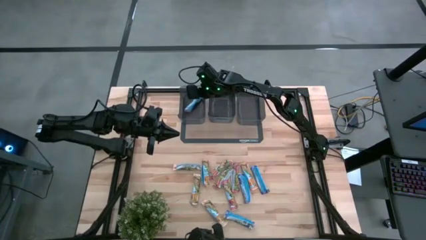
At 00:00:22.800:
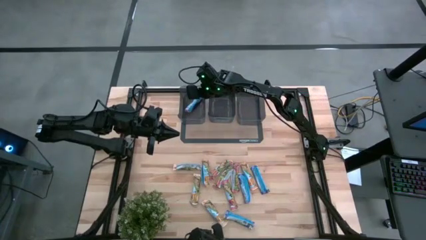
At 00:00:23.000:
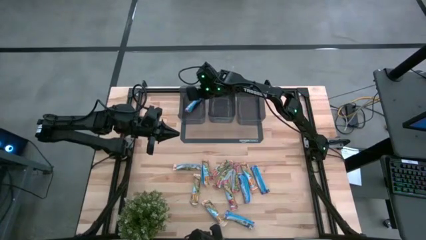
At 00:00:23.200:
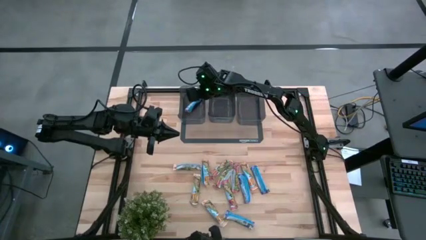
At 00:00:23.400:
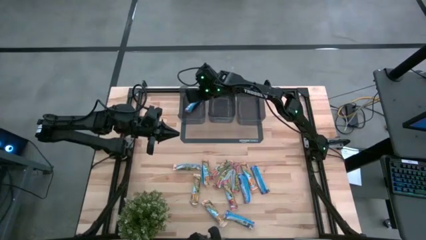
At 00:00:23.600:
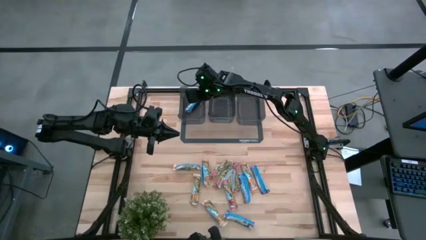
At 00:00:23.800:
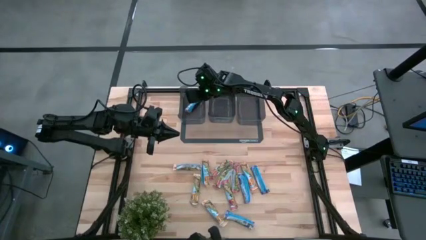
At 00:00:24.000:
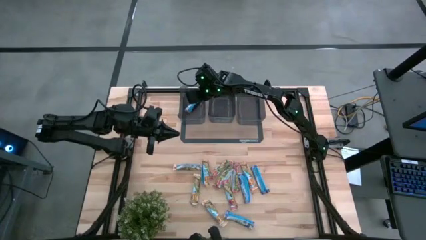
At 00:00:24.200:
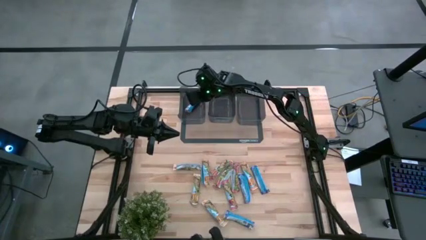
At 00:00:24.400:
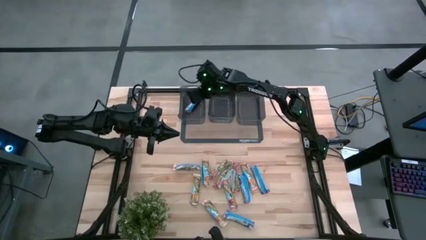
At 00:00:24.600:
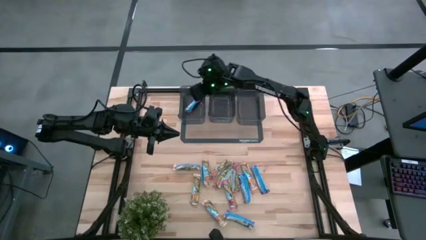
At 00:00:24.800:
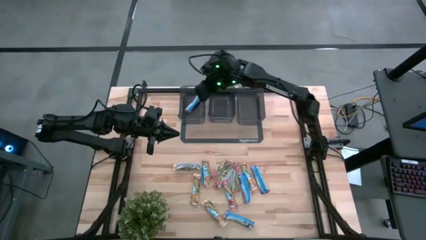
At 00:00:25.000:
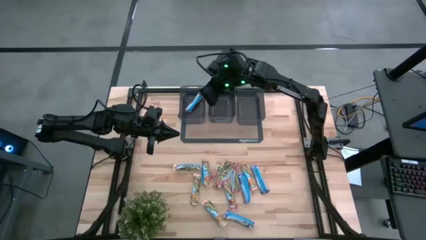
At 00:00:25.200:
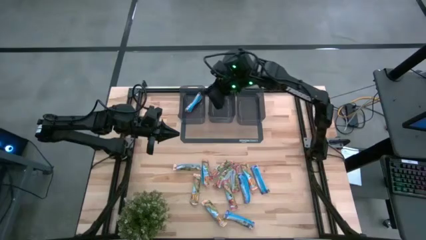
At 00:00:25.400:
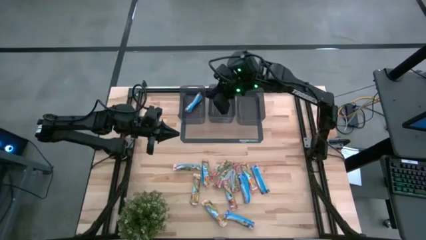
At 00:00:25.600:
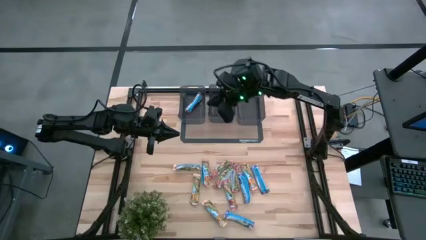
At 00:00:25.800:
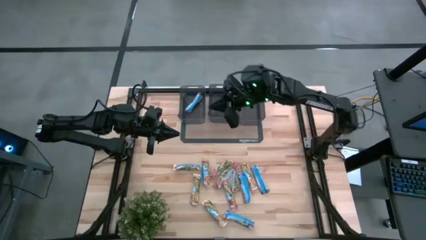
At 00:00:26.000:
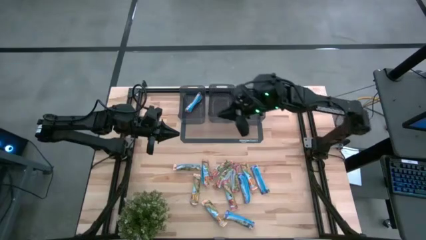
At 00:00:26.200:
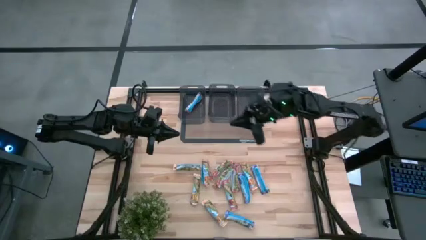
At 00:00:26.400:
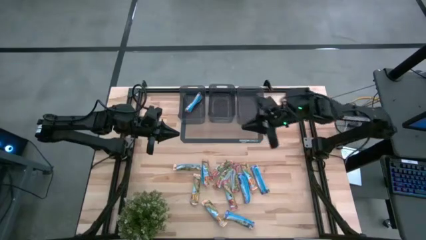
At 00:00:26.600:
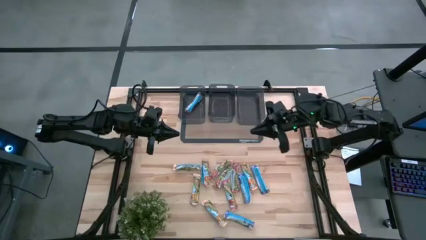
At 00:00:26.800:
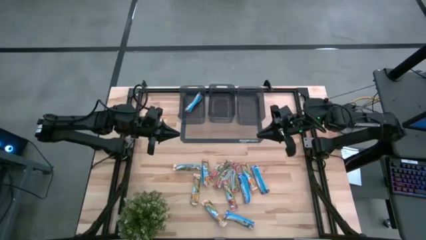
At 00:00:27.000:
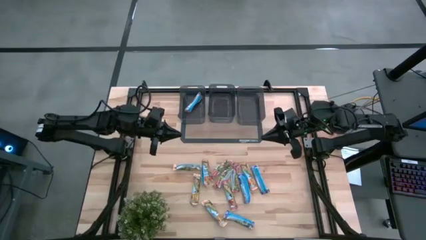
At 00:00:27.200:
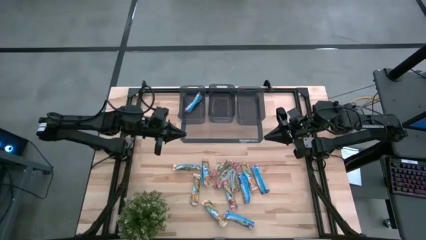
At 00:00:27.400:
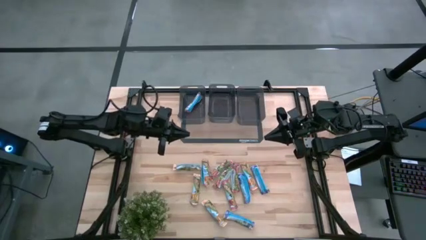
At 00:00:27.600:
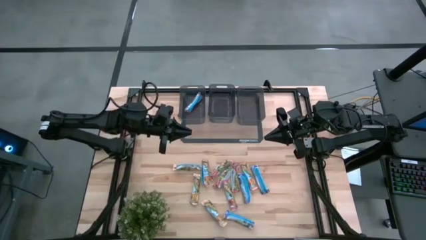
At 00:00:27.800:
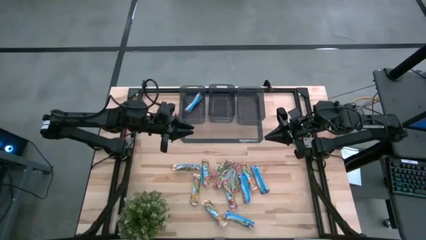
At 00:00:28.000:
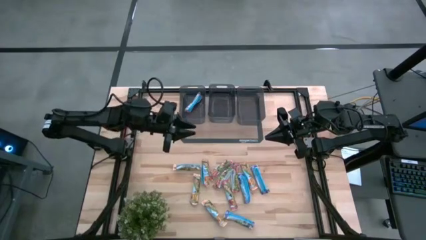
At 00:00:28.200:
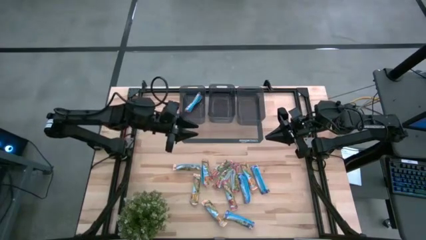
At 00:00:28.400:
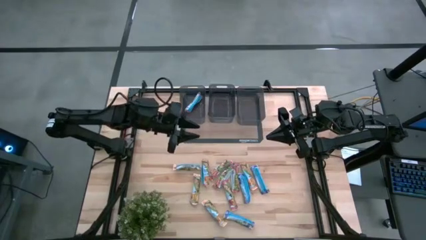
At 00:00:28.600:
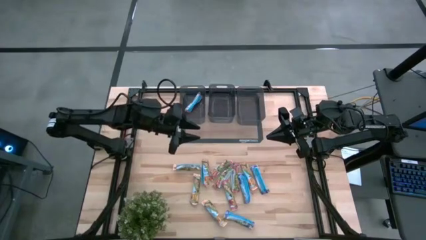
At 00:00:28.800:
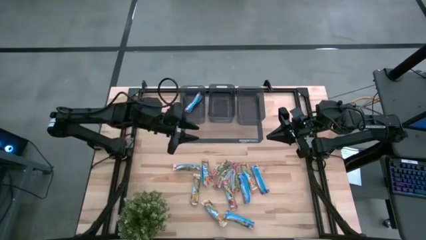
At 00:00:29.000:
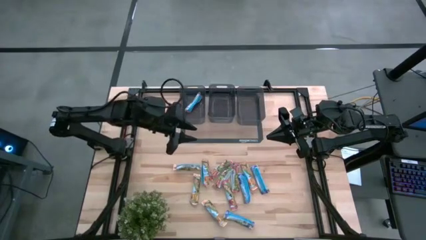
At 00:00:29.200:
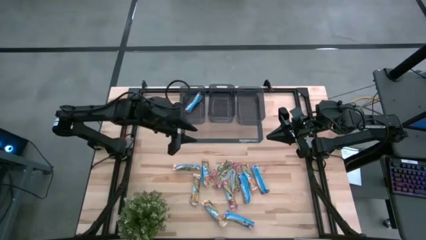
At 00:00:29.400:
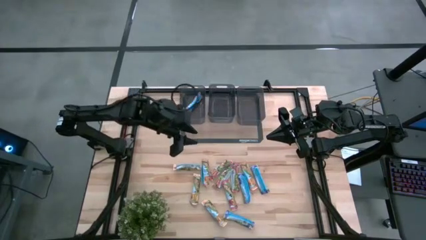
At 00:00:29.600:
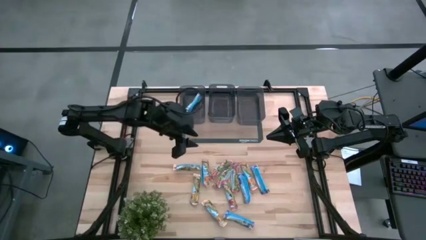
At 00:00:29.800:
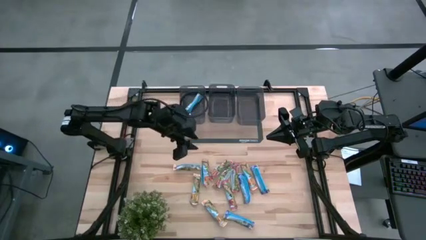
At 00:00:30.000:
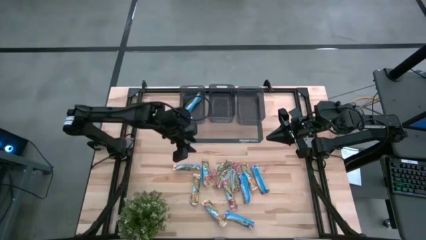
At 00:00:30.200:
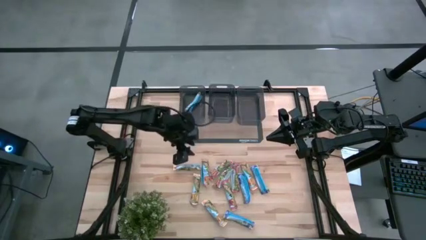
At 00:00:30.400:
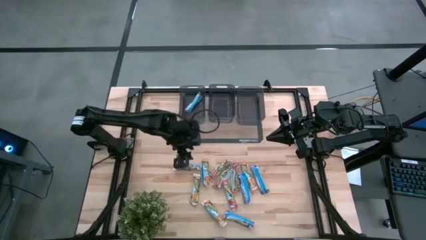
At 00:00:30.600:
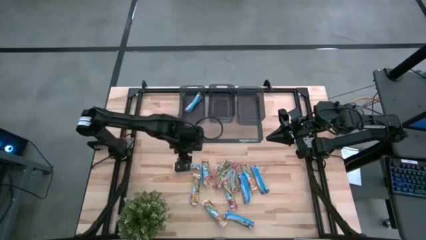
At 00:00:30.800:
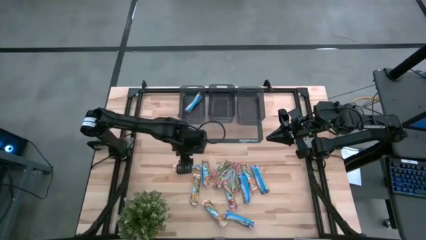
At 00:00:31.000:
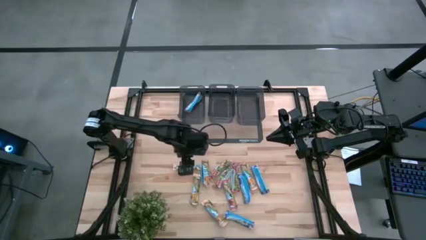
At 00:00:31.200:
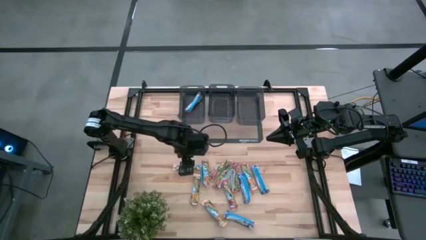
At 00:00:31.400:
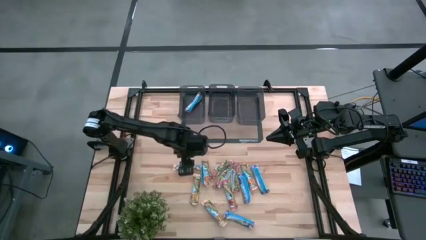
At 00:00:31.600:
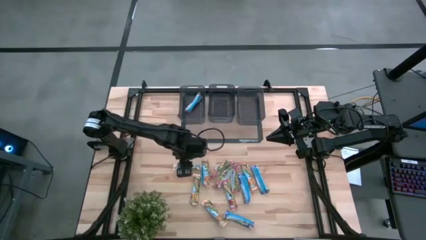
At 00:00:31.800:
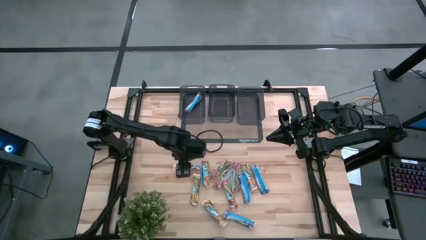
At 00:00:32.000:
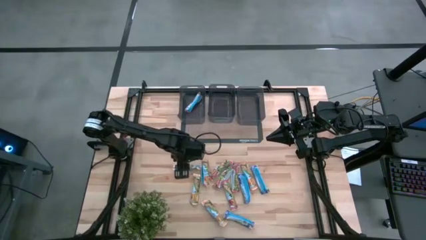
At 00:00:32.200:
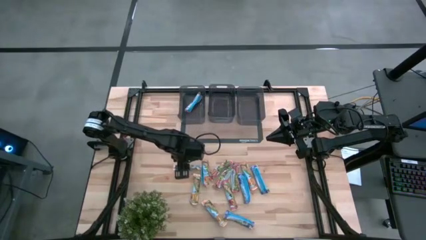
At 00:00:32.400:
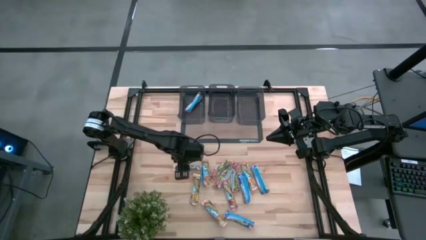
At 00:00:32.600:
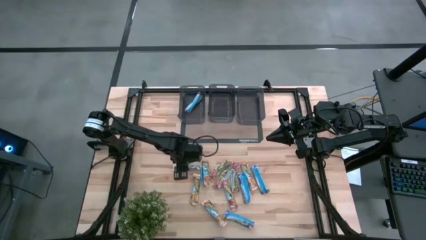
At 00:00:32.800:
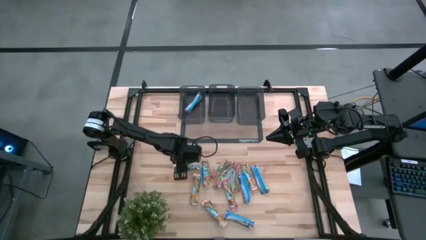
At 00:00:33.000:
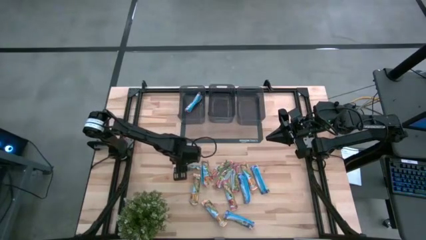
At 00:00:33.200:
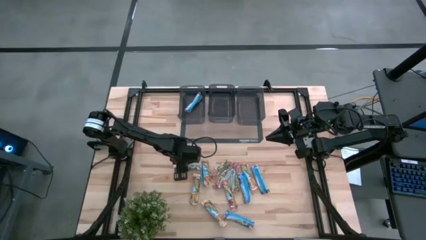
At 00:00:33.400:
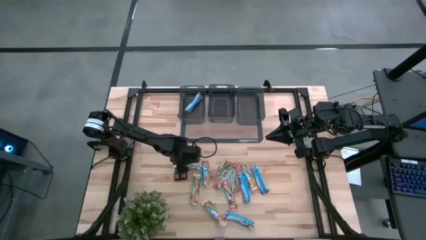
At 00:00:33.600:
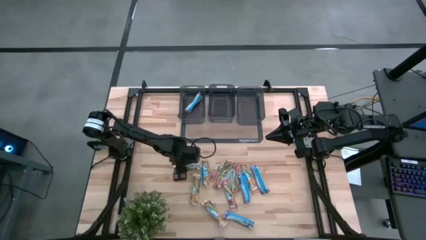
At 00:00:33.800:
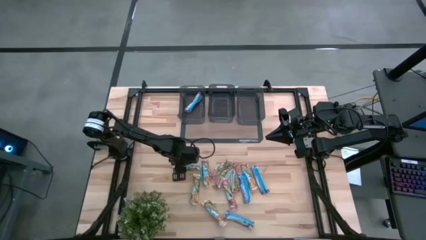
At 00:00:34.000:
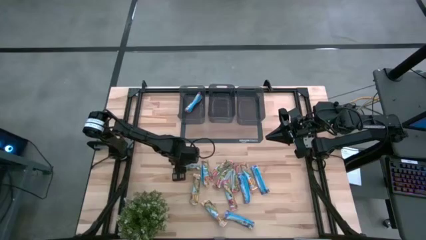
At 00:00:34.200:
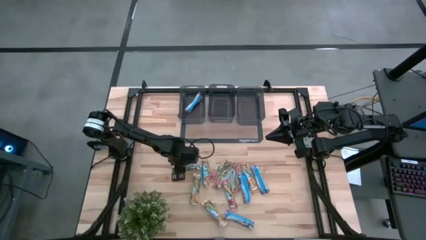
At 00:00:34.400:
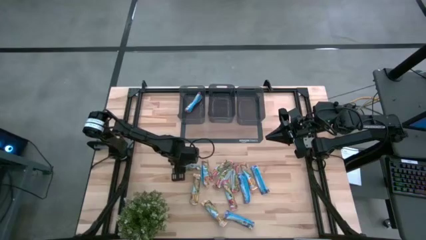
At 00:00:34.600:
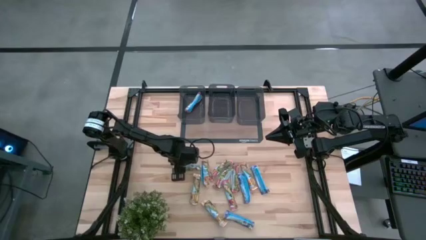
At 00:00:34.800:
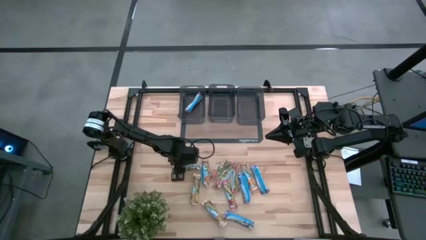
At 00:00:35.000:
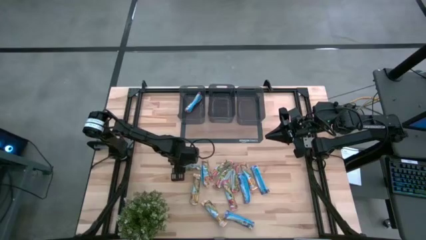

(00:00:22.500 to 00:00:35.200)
Task: Pick and place Granola Bars by type
Put the yellow granola bar into the right black bin
